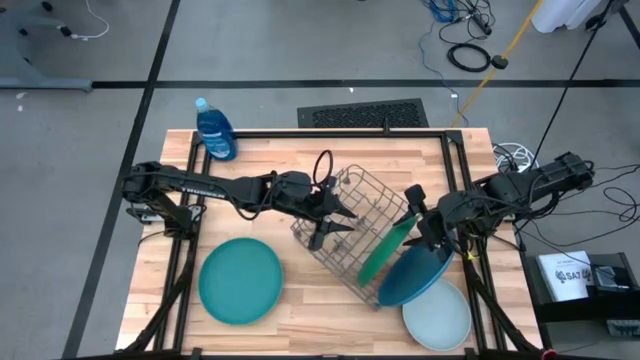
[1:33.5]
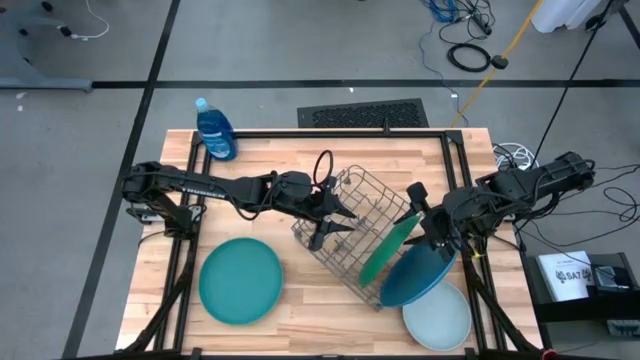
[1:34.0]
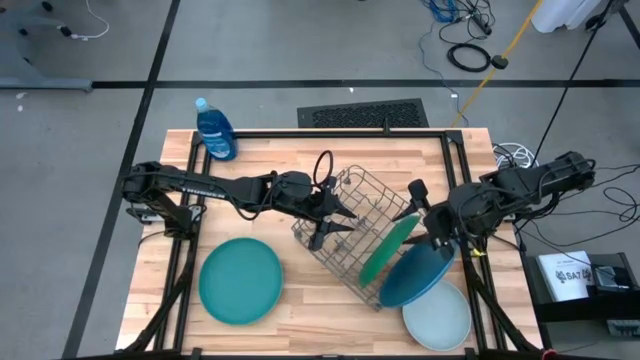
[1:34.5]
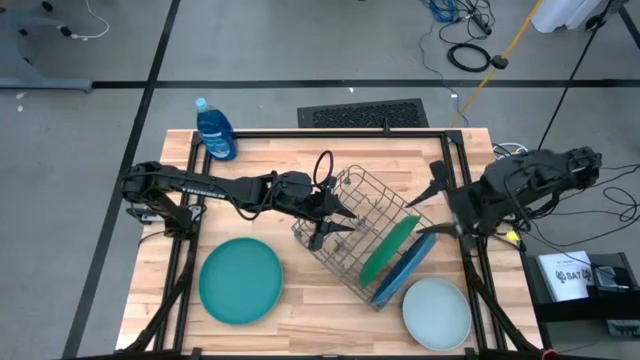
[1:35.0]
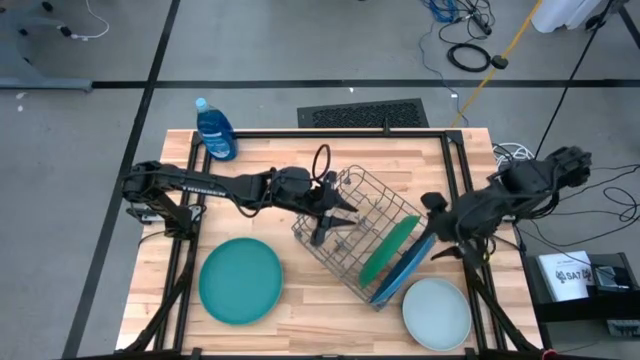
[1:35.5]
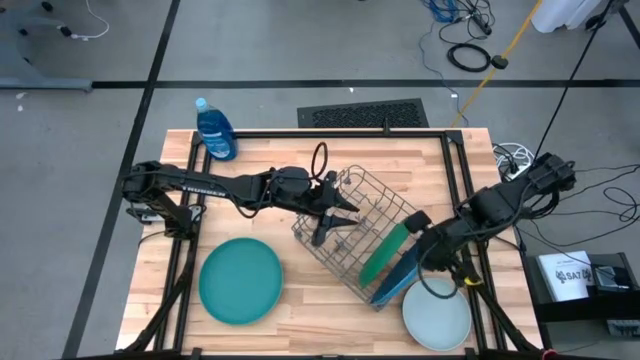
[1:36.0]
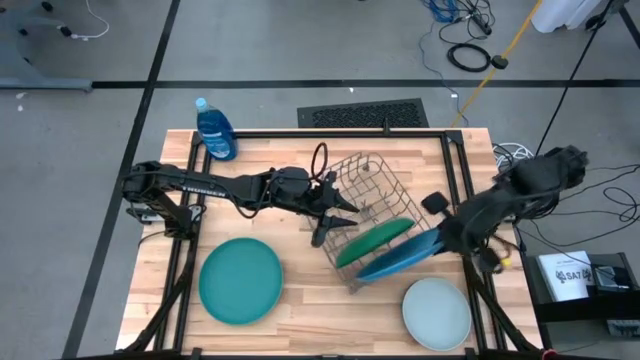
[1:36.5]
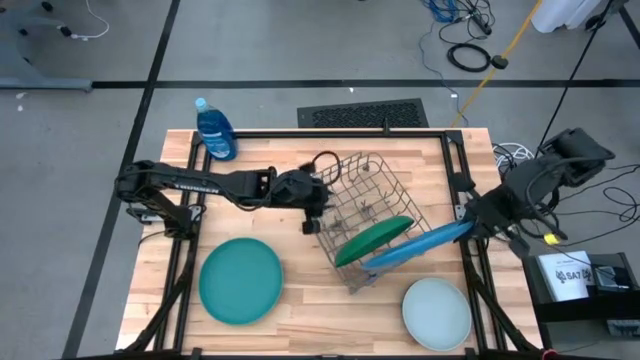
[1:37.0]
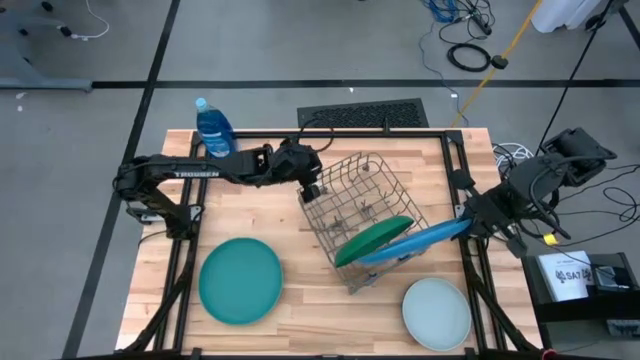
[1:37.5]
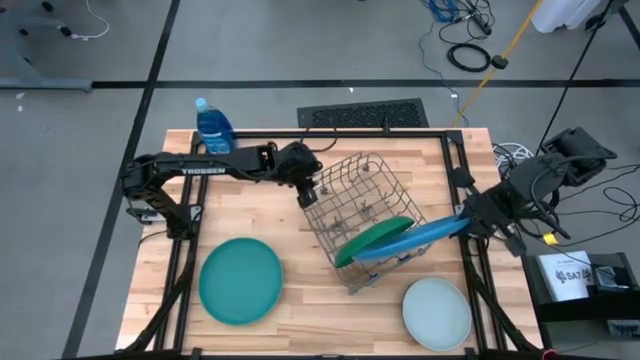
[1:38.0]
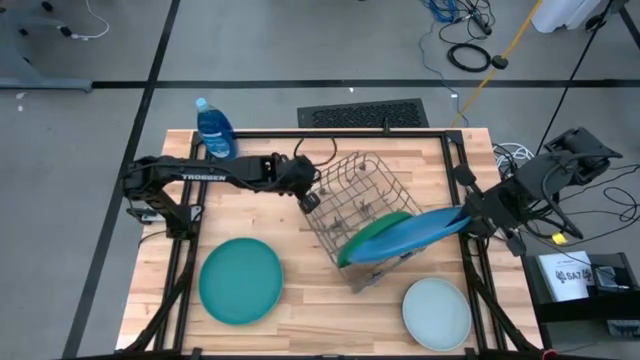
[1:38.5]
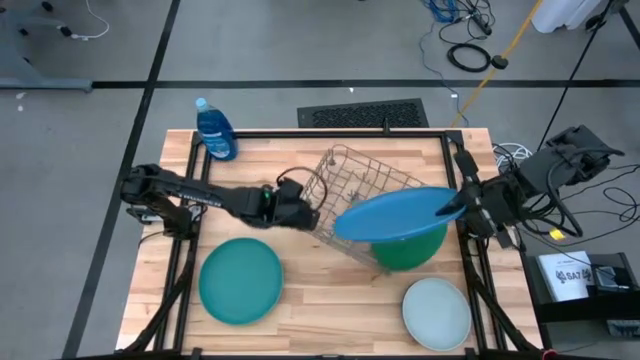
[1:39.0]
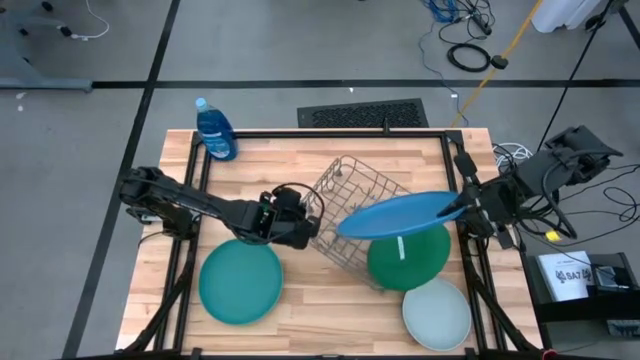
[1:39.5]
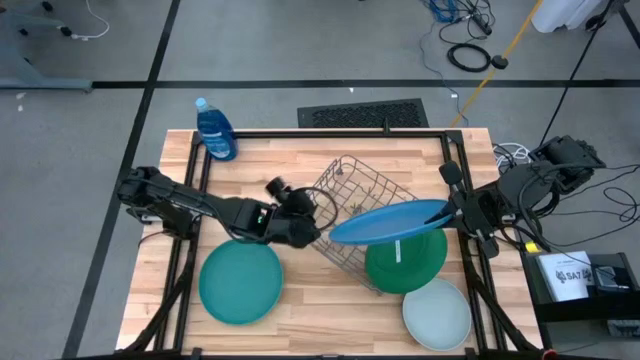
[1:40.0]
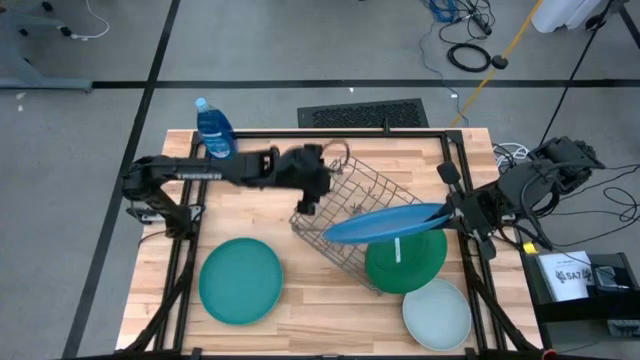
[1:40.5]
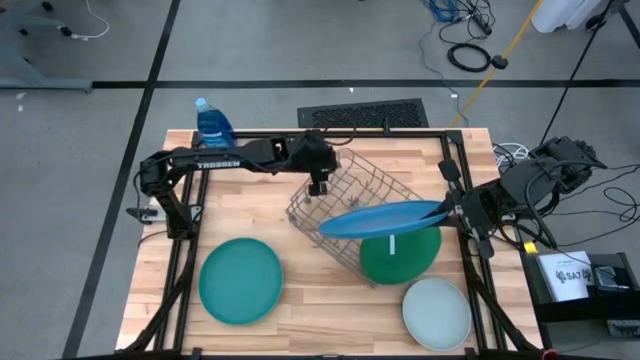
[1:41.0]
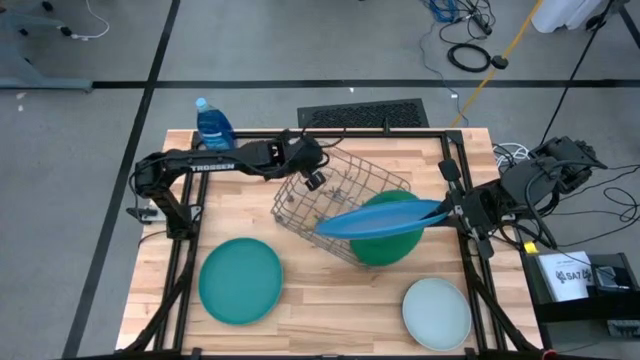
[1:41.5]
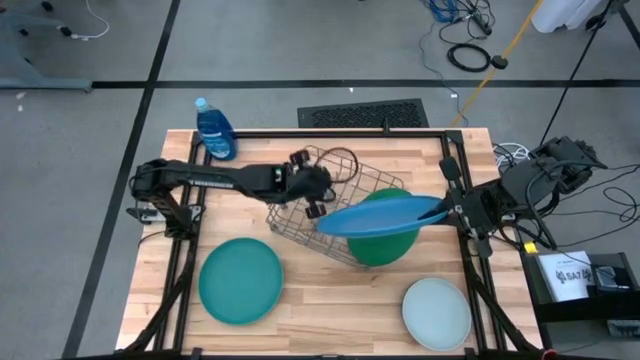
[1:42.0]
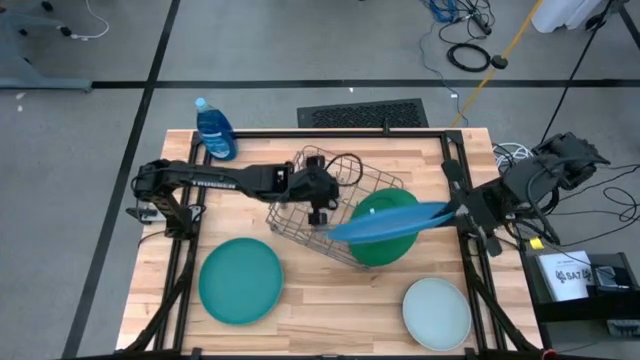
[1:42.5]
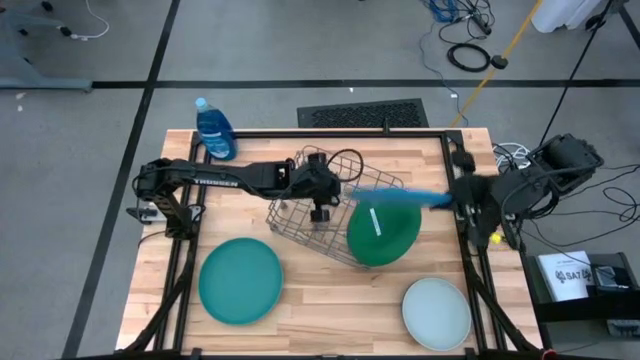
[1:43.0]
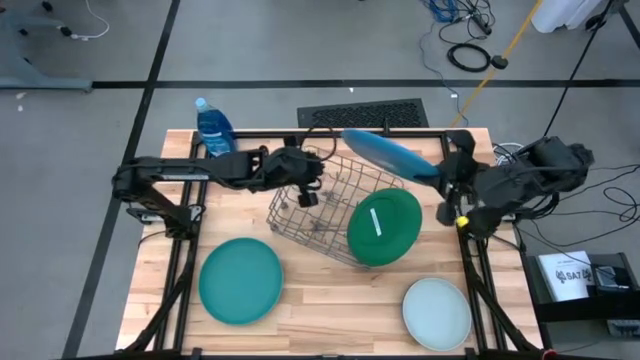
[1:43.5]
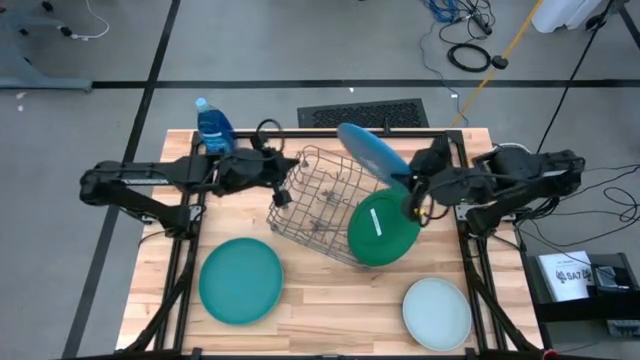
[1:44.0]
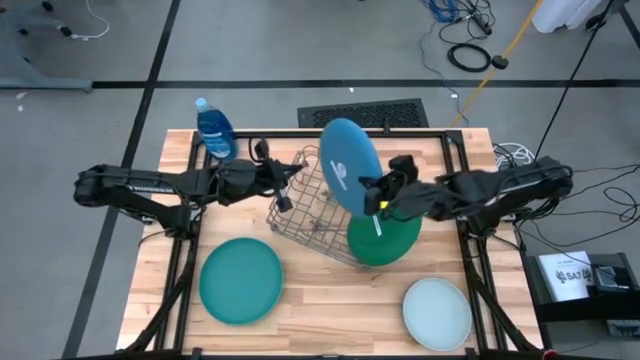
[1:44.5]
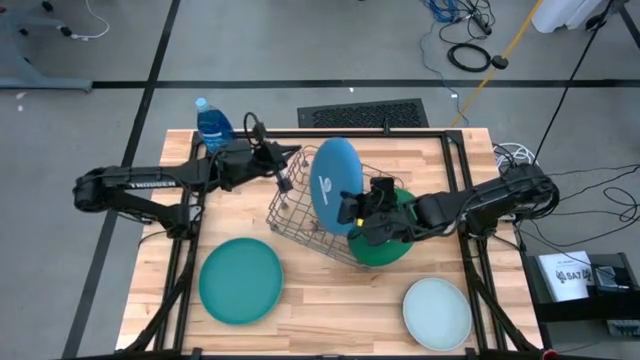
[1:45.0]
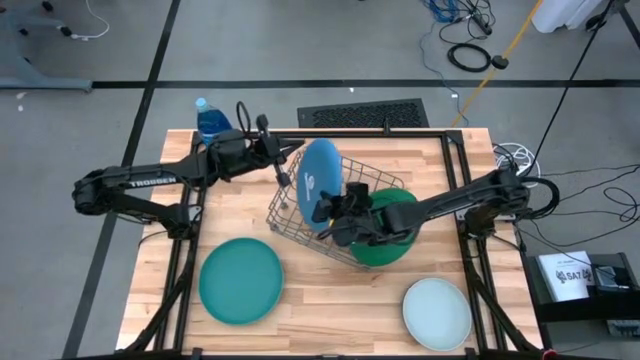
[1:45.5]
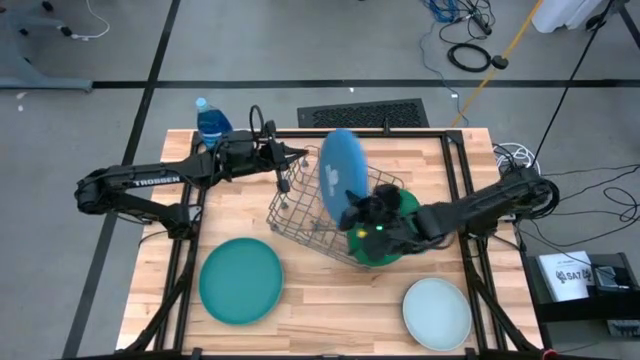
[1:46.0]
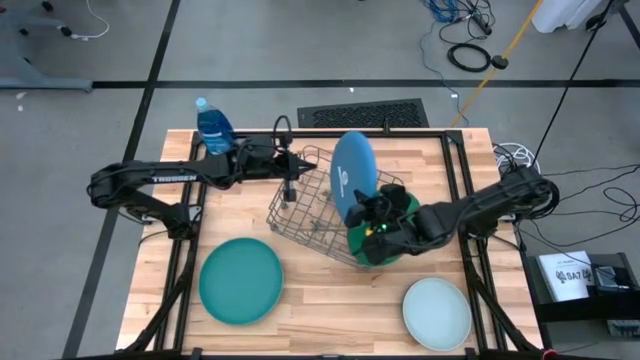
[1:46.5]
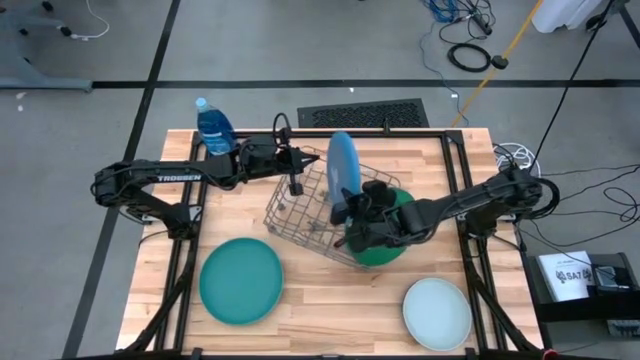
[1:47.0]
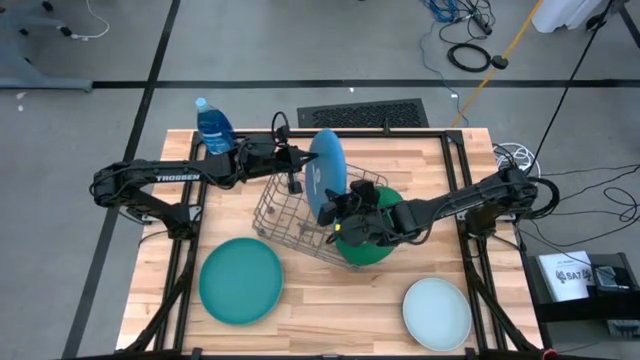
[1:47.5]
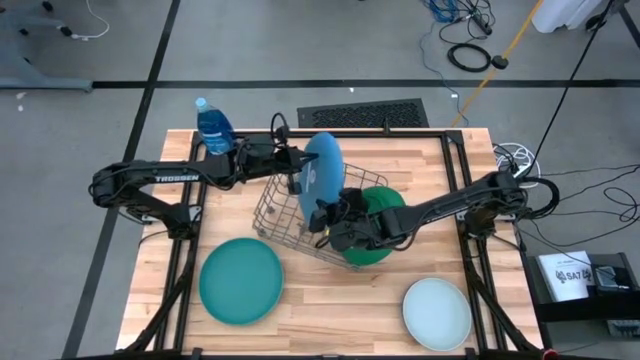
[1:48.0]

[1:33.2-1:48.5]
Task: Sort dishes
Adjust the plates in the dish rack
